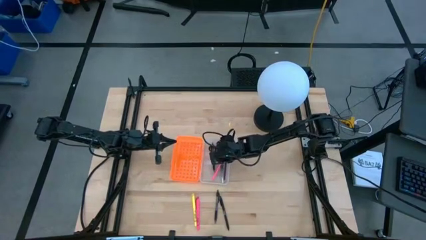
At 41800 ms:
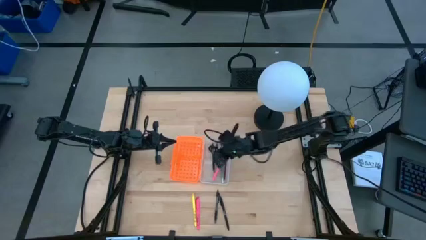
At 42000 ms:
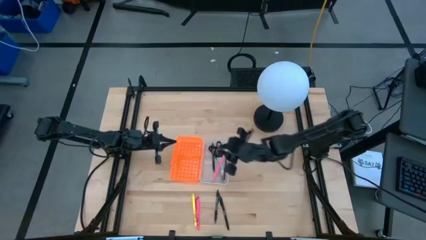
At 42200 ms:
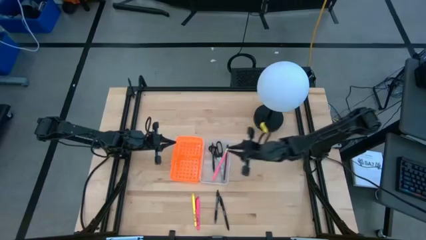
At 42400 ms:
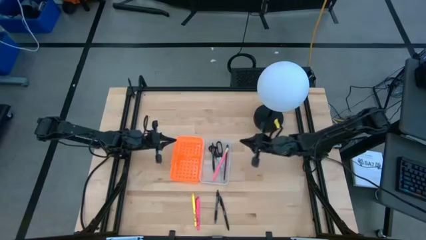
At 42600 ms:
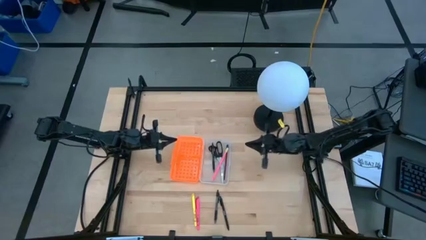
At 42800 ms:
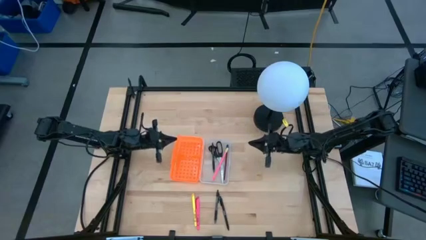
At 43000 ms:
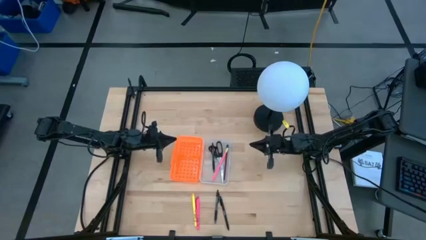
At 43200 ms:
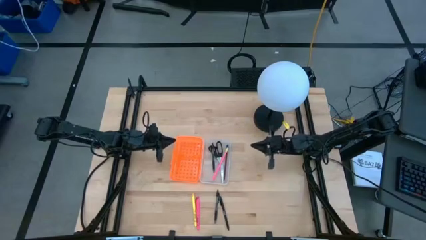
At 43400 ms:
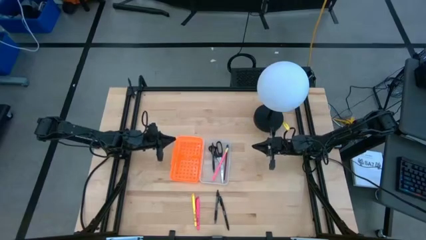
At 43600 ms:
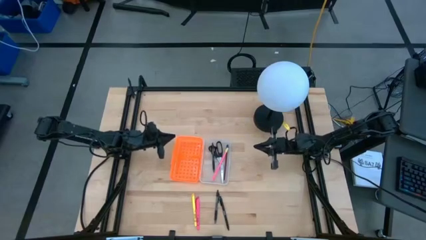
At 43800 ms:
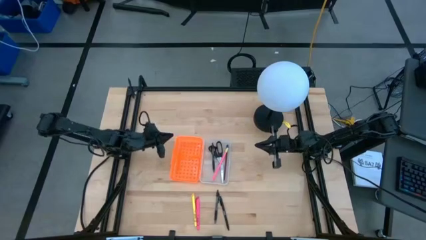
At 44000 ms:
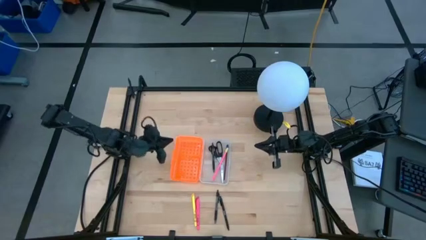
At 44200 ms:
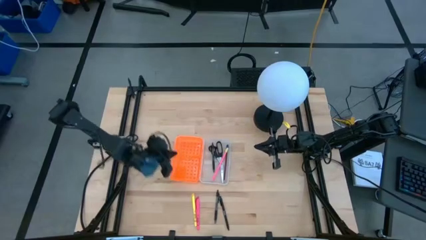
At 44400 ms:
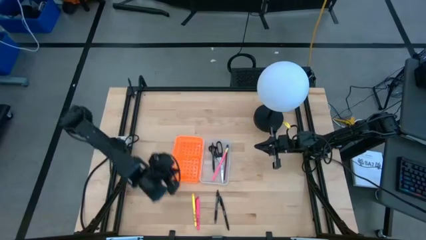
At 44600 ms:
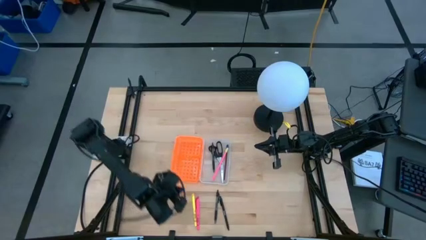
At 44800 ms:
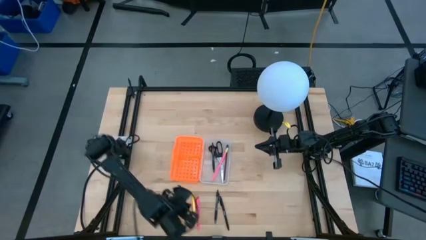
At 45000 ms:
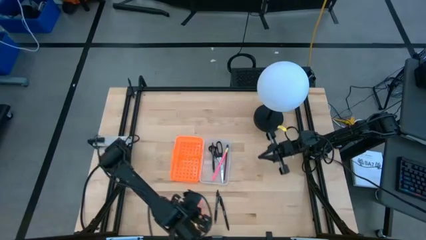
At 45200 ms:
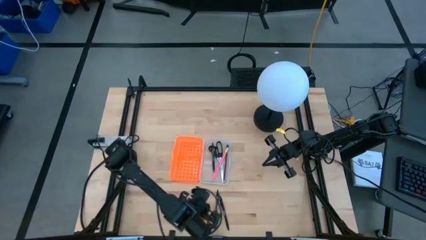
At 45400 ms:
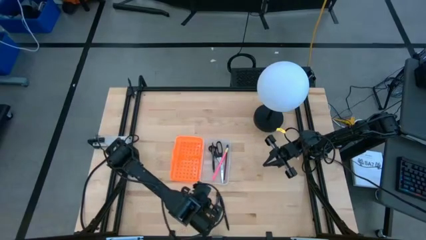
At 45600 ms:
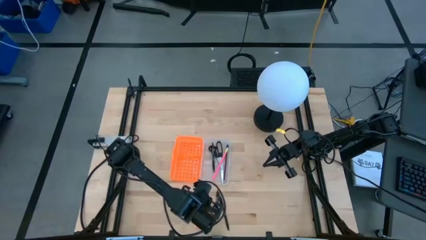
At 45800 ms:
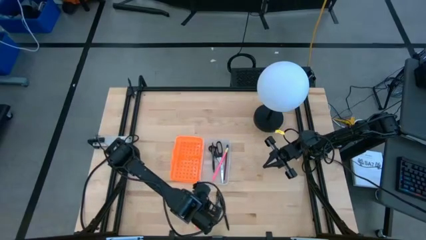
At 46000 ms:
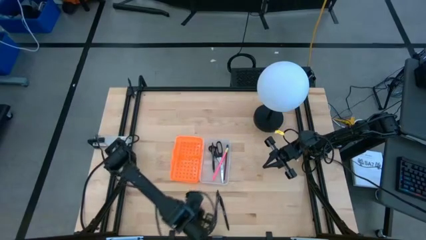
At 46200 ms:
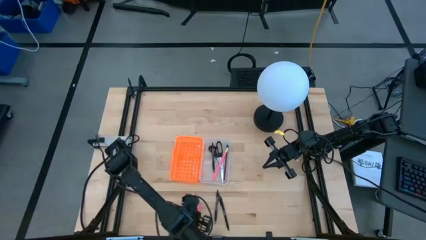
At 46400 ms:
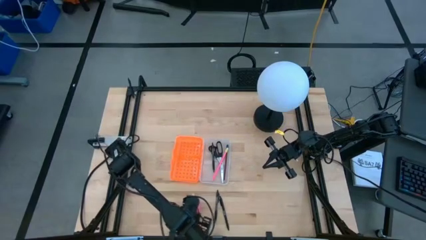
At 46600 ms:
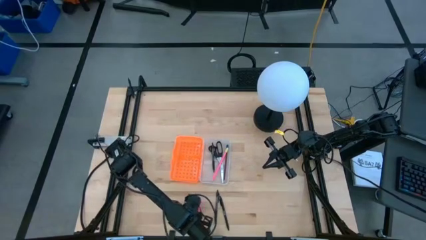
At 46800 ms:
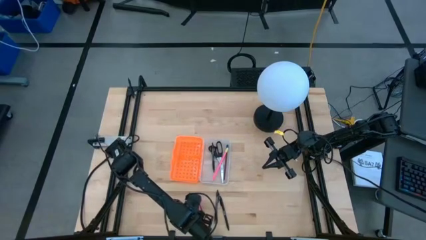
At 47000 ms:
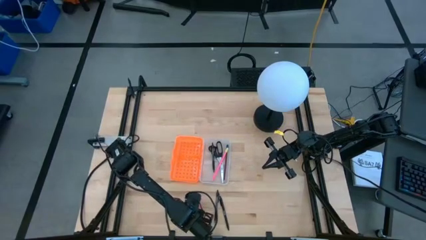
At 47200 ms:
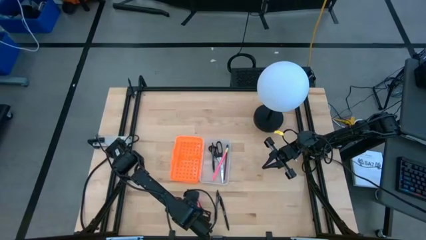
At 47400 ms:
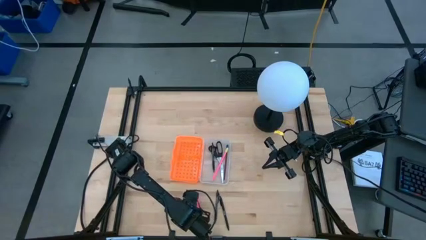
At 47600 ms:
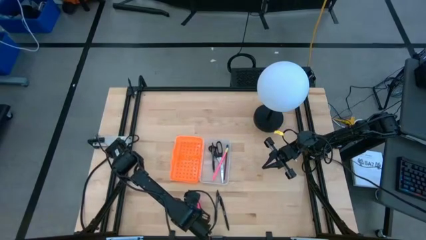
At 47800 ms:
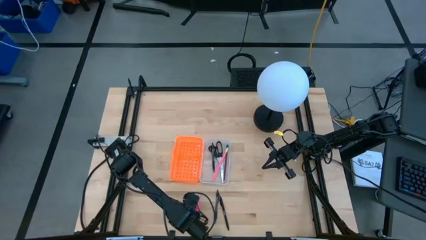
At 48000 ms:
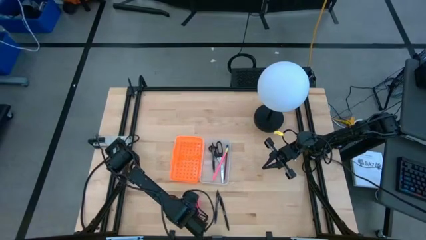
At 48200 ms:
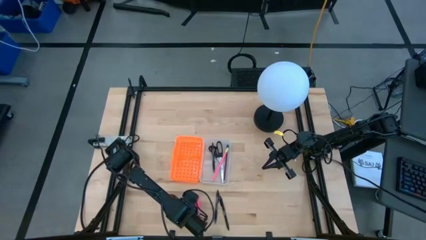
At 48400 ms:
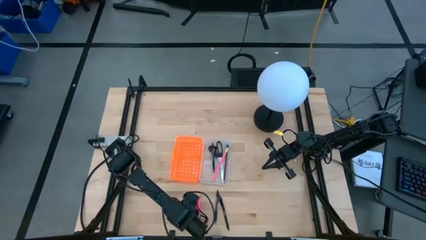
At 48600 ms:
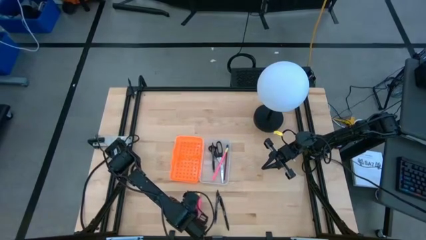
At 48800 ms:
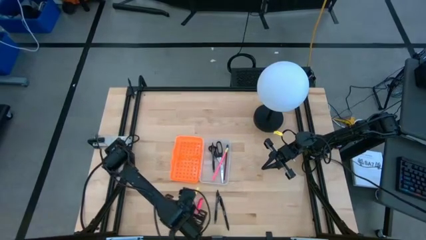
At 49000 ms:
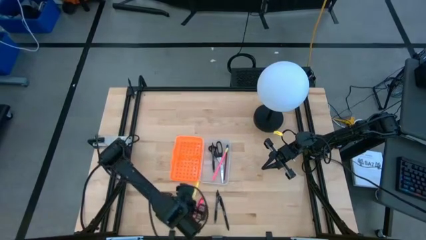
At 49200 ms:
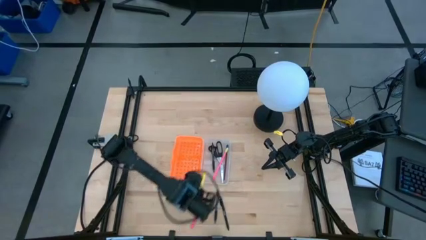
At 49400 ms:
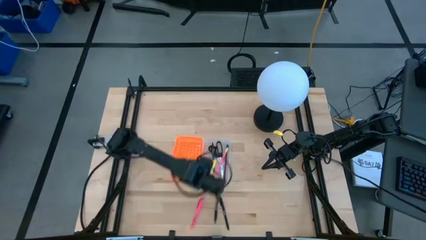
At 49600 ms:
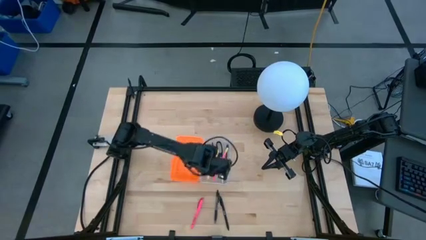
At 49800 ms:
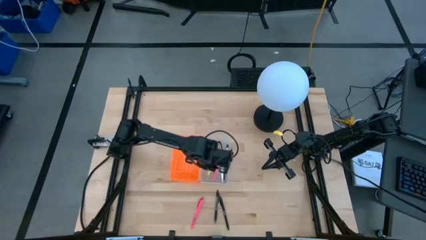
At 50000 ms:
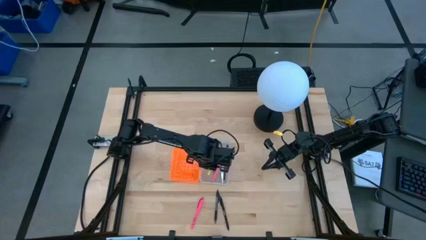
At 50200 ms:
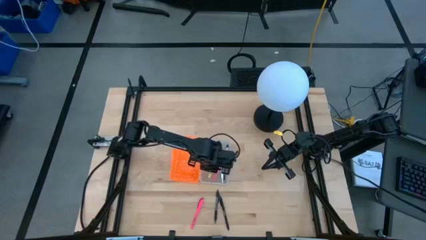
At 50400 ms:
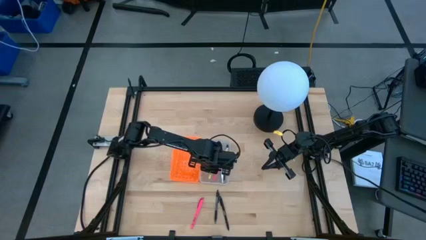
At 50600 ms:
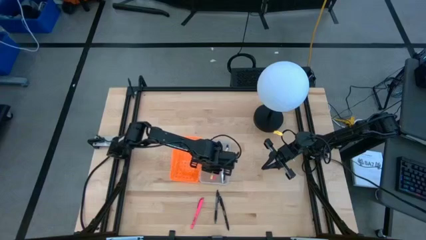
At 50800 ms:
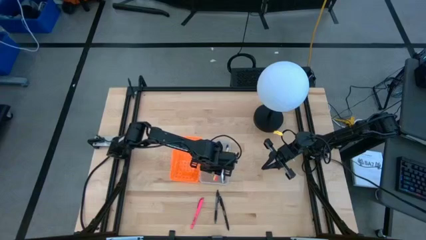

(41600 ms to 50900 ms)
Task: Pick & place school supplies into a supply box
Put the yellow pen into the supply box

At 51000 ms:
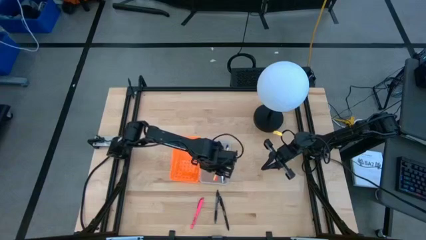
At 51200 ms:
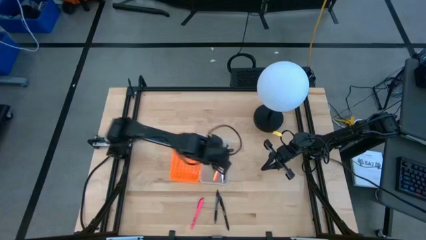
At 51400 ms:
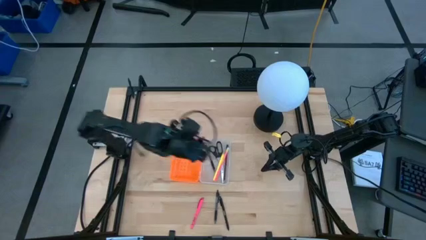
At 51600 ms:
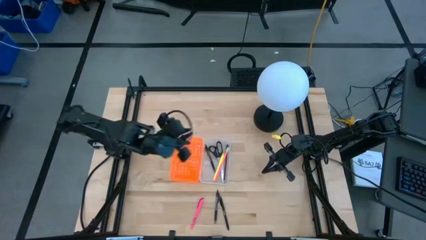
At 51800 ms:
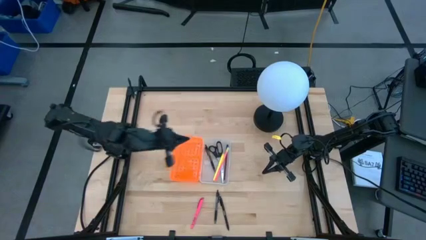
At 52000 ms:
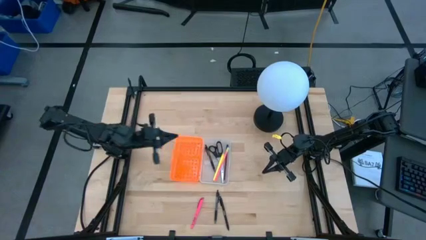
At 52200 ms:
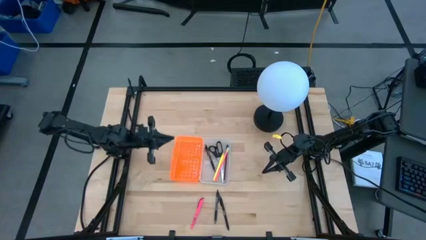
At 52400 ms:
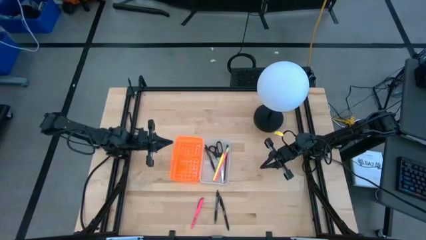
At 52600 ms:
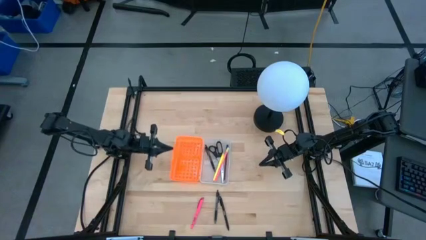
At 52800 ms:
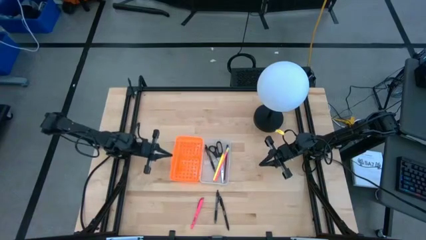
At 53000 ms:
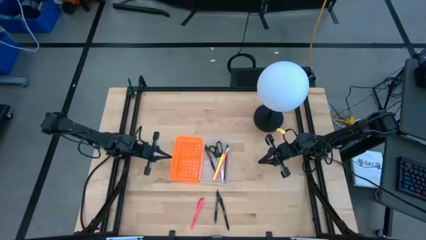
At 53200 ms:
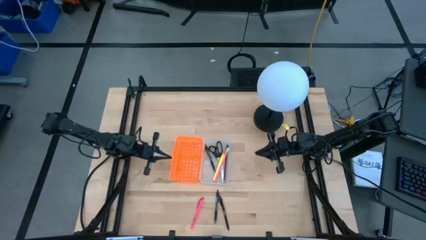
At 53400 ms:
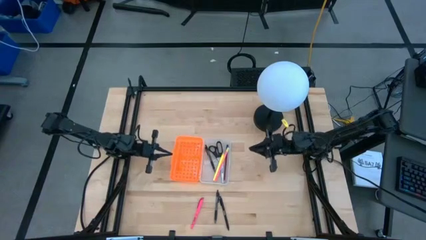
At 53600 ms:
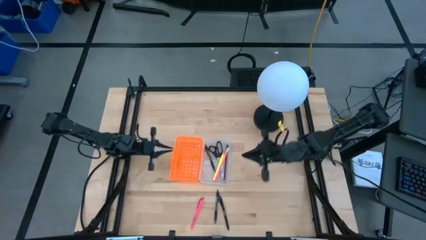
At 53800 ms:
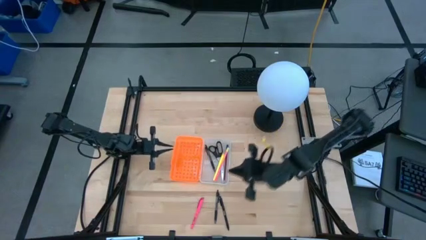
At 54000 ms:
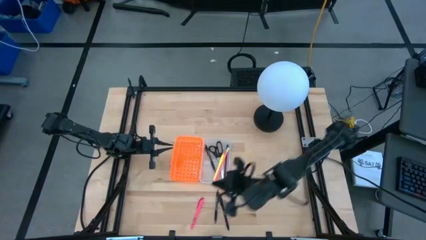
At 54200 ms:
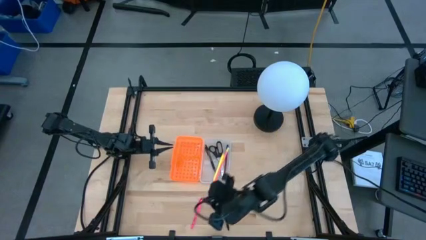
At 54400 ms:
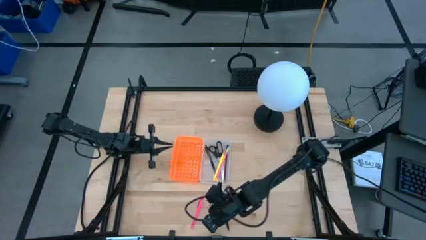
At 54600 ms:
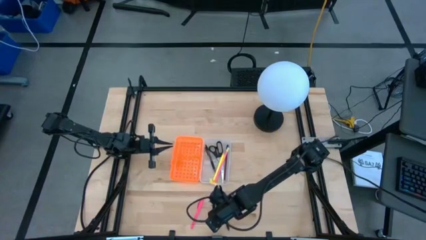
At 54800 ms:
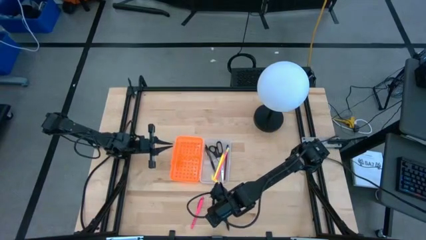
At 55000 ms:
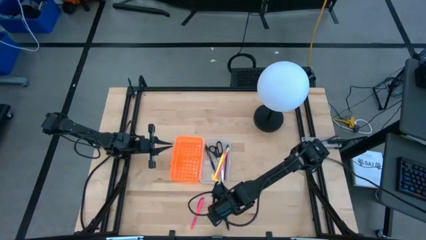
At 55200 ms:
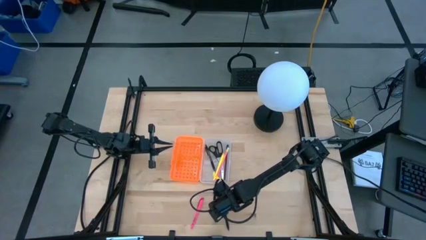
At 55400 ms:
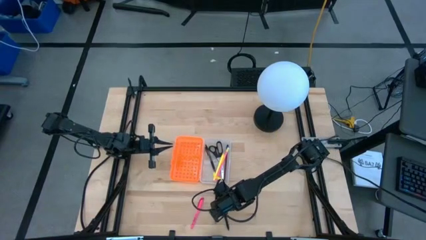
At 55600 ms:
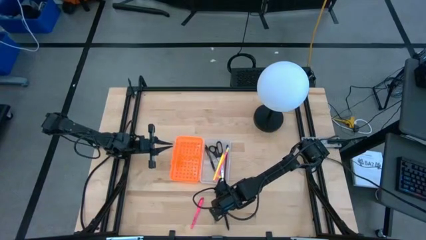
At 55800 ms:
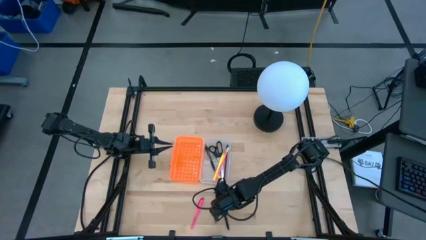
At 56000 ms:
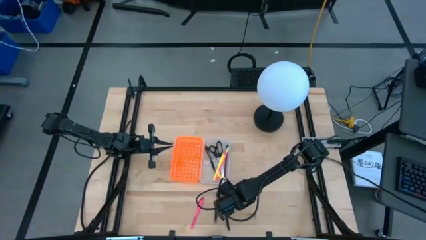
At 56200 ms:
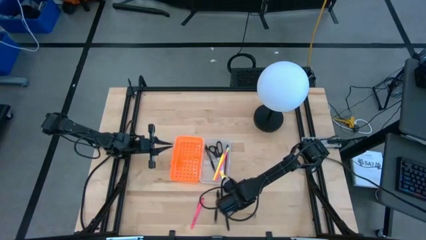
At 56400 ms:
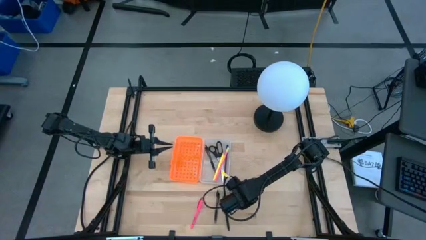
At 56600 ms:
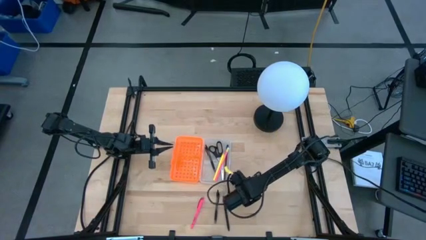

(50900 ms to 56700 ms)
Put the black pen into the supply box

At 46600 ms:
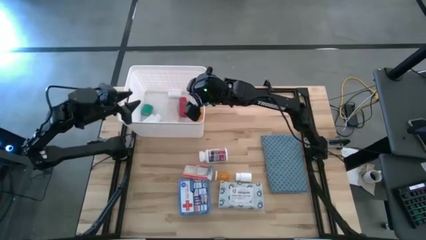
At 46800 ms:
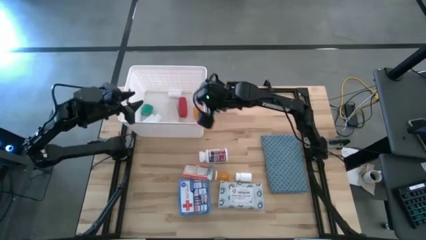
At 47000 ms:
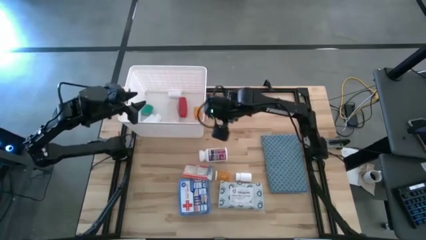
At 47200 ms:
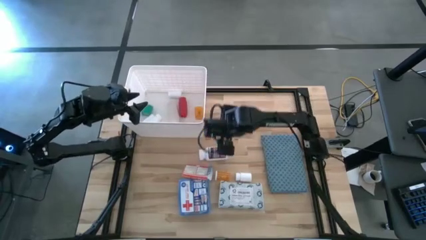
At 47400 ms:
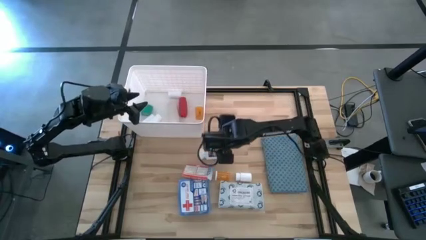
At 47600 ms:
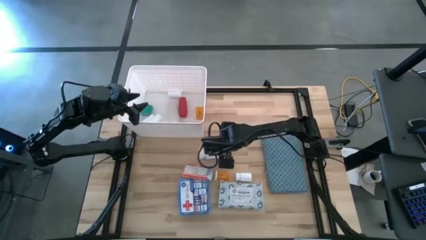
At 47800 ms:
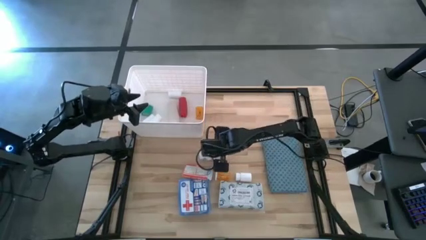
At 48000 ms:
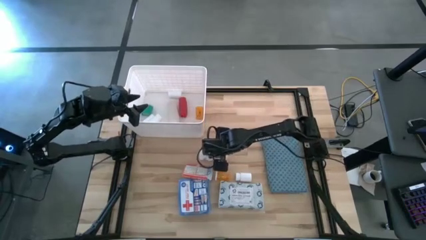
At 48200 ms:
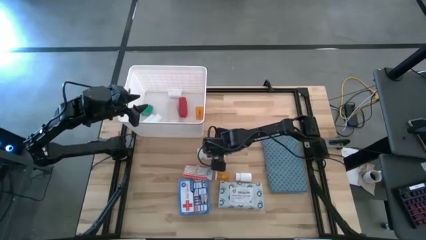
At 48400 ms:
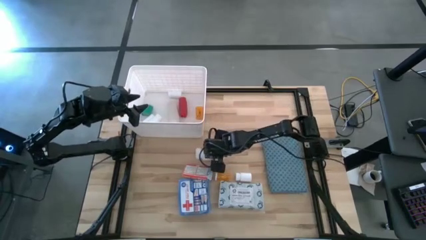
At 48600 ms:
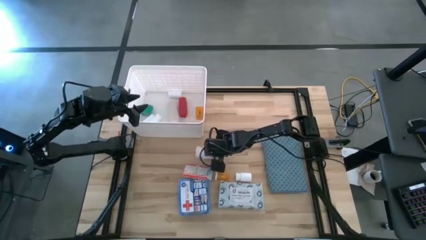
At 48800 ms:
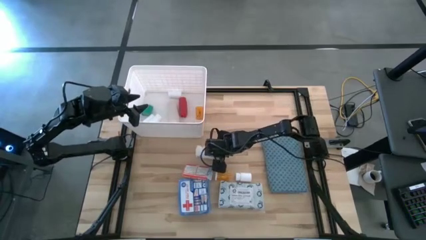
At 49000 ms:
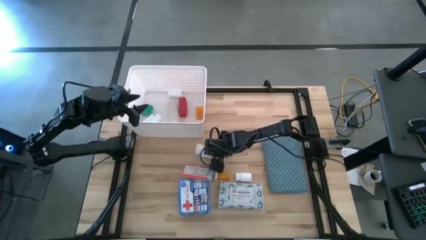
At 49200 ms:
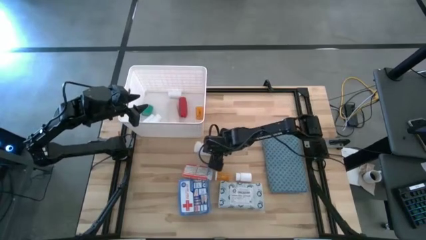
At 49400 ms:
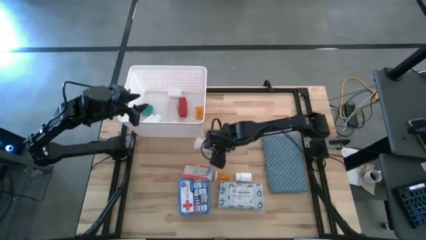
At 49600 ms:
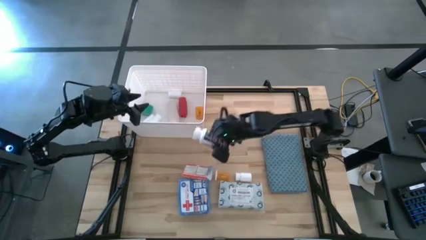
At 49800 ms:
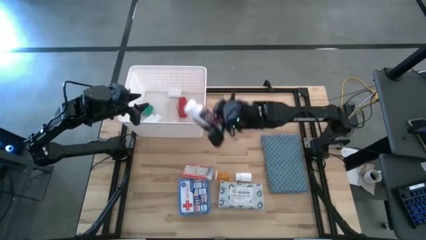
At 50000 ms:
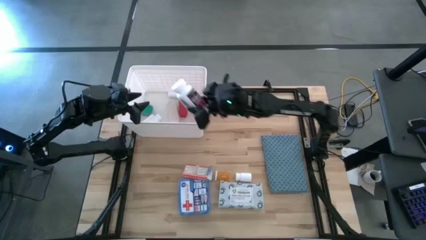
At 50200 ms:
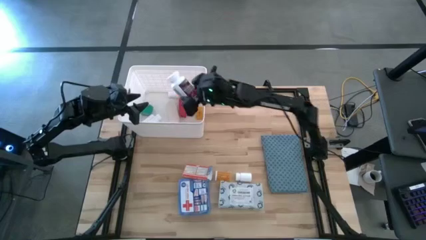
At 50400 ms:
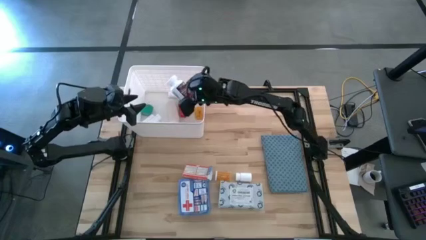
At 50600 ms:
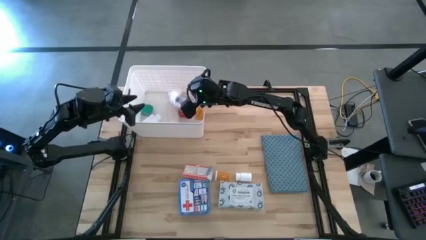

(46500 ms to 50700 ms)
Task: Pick & place medical supplies in basket/bin
Put the white purple pill bottle into the white bin
